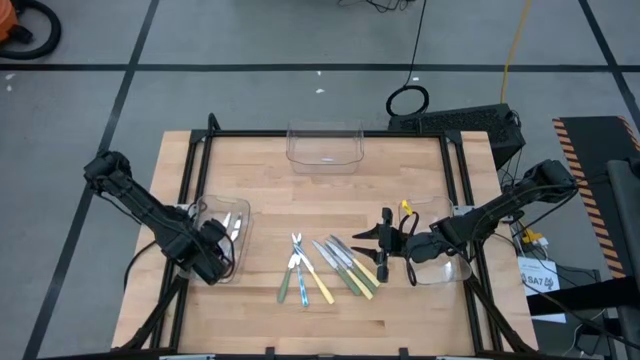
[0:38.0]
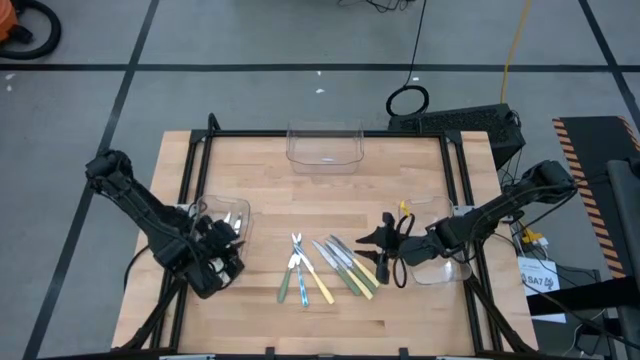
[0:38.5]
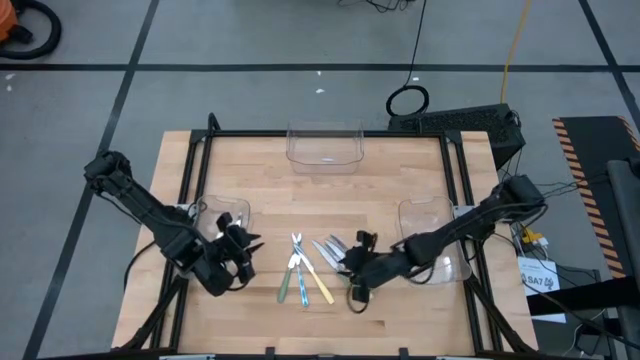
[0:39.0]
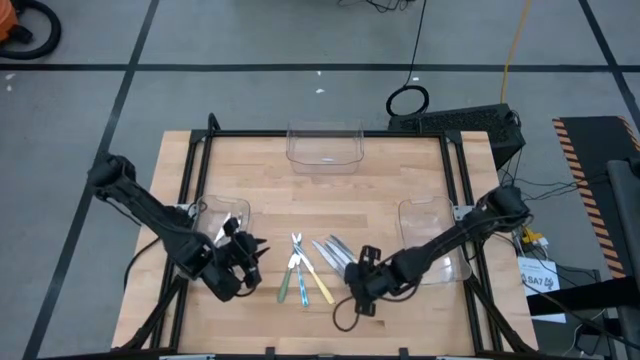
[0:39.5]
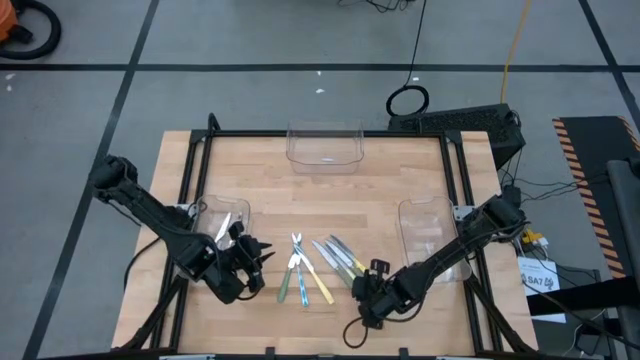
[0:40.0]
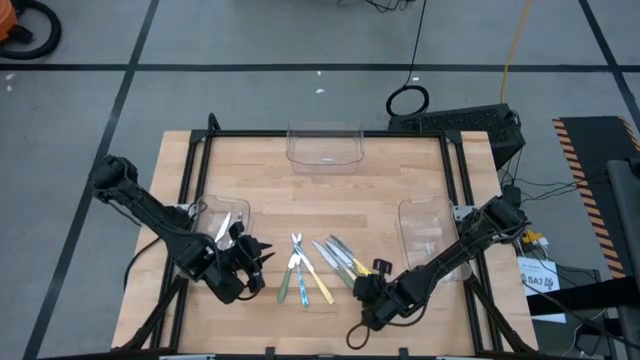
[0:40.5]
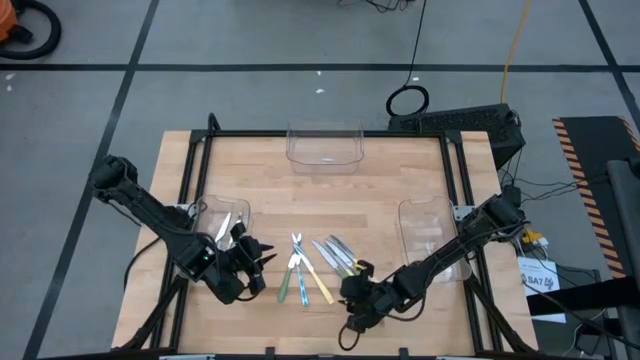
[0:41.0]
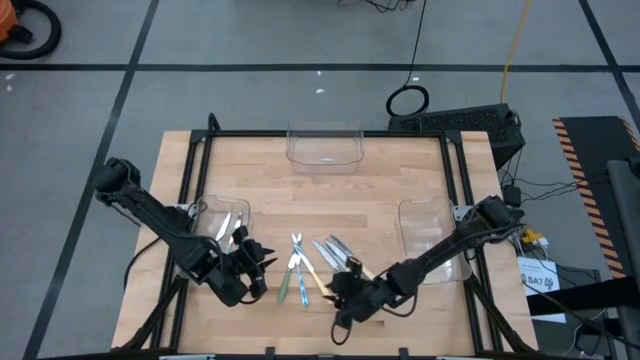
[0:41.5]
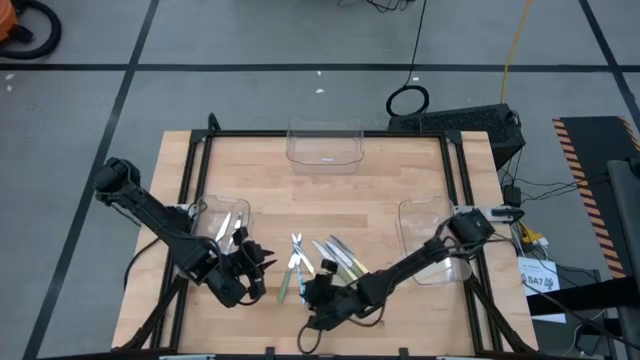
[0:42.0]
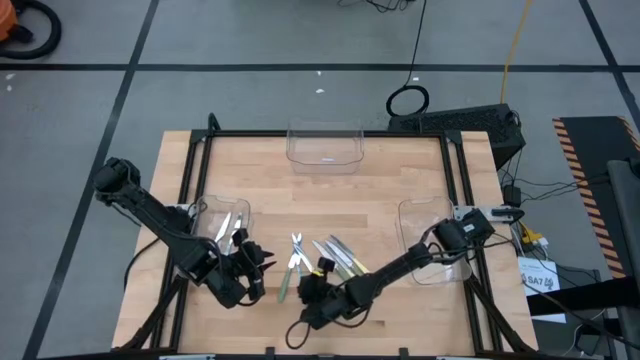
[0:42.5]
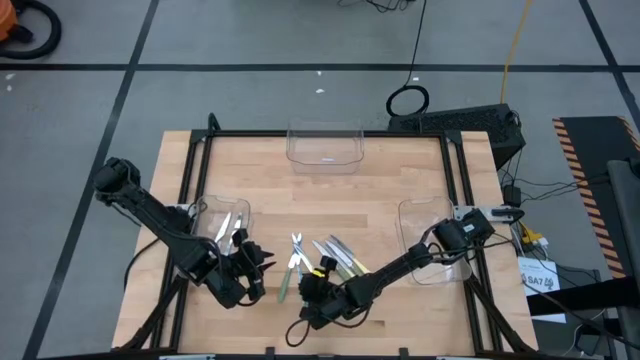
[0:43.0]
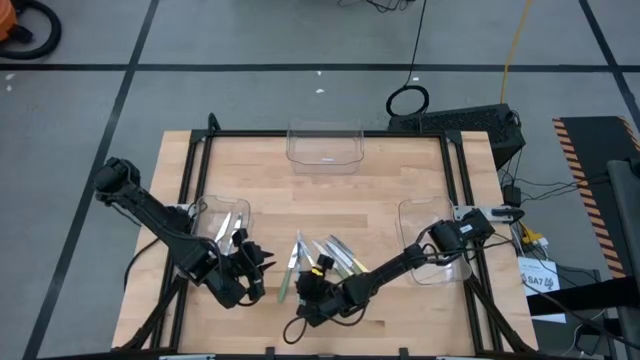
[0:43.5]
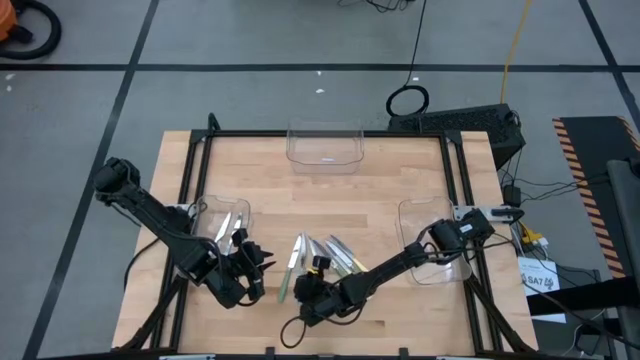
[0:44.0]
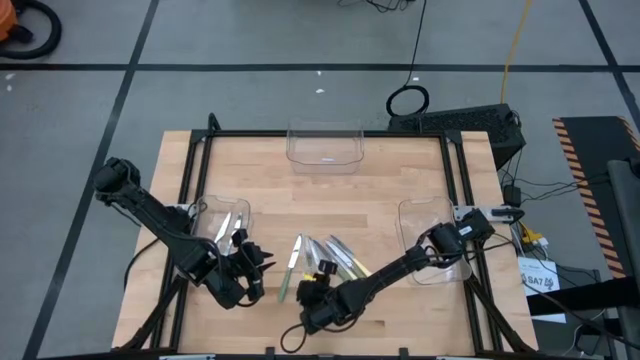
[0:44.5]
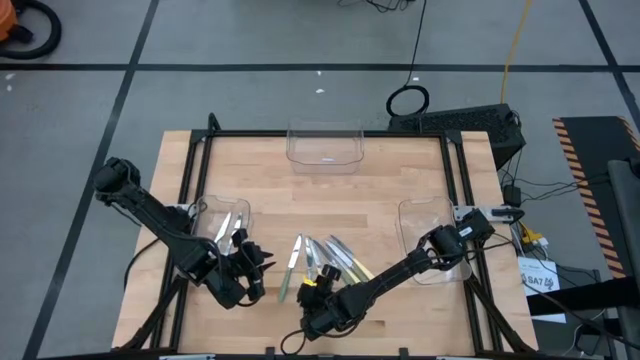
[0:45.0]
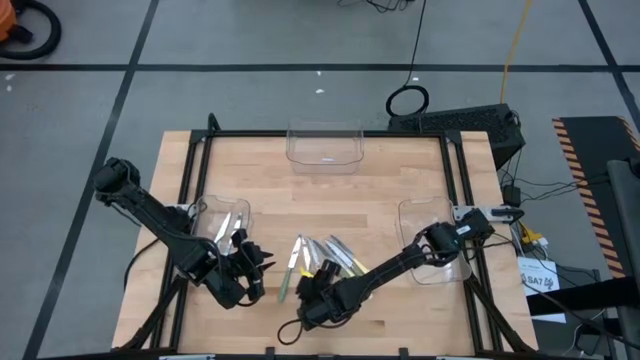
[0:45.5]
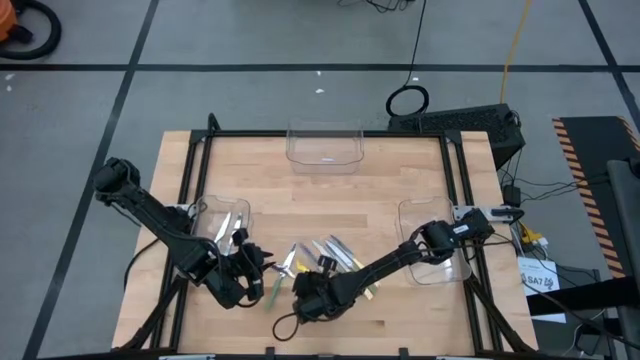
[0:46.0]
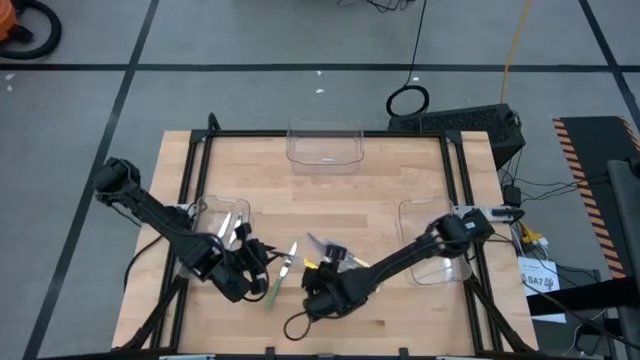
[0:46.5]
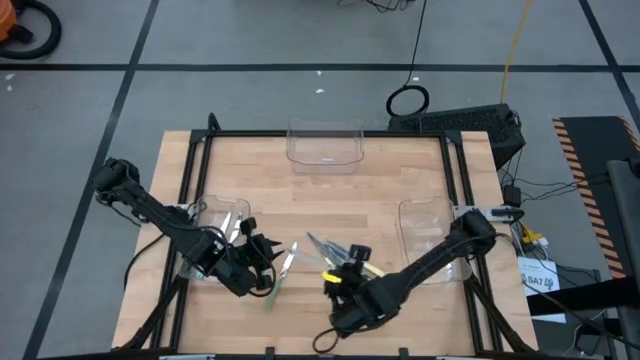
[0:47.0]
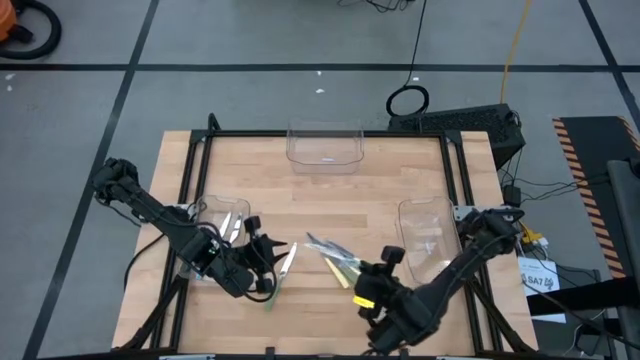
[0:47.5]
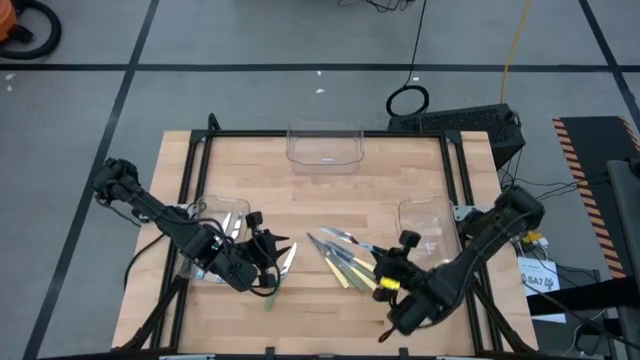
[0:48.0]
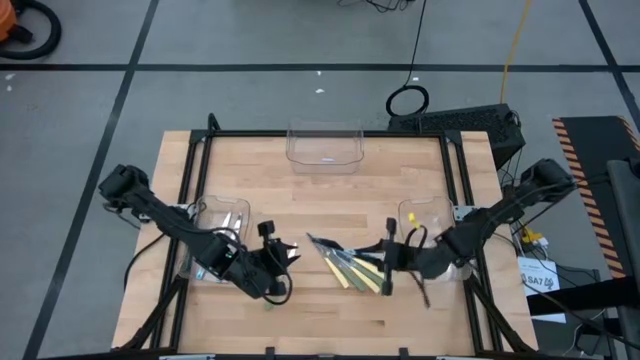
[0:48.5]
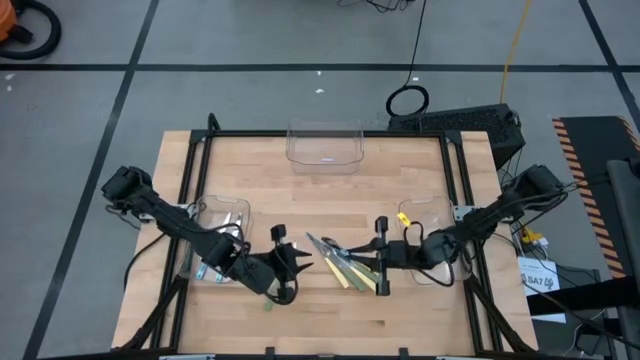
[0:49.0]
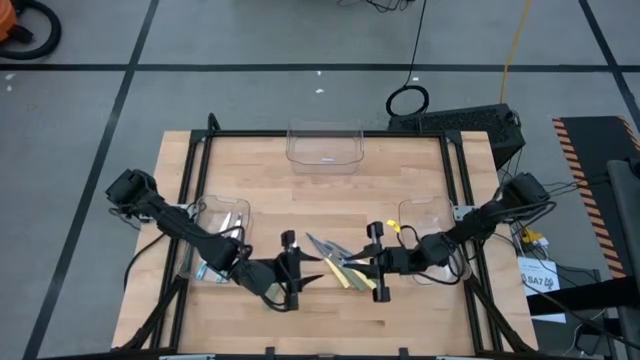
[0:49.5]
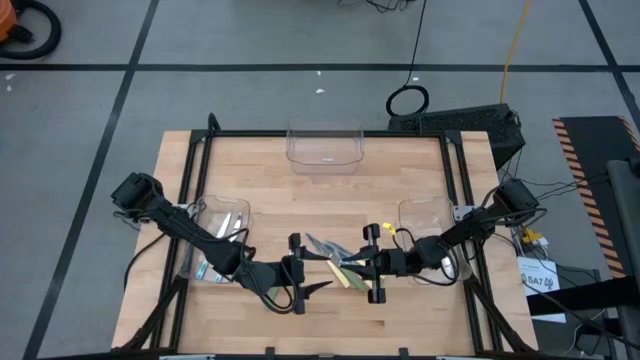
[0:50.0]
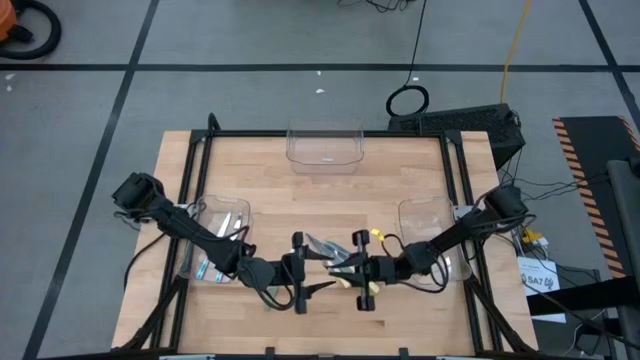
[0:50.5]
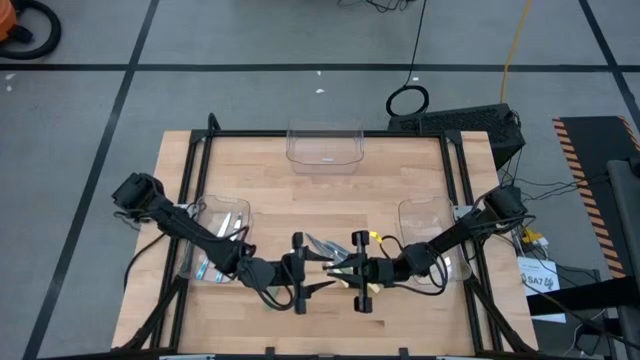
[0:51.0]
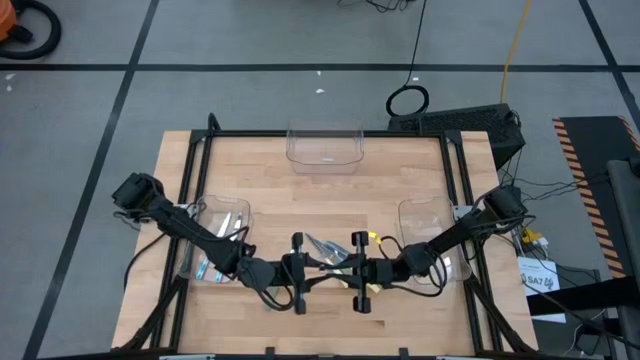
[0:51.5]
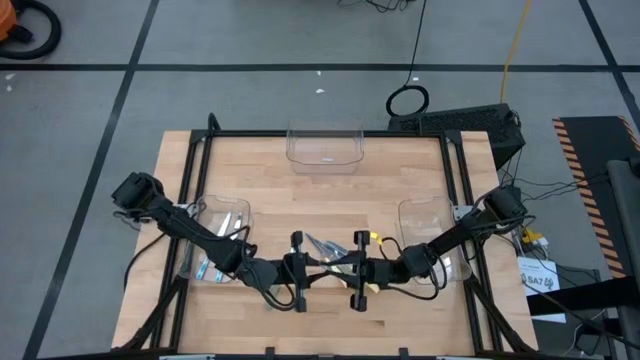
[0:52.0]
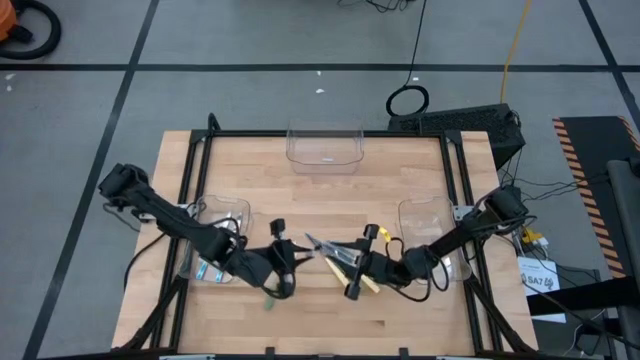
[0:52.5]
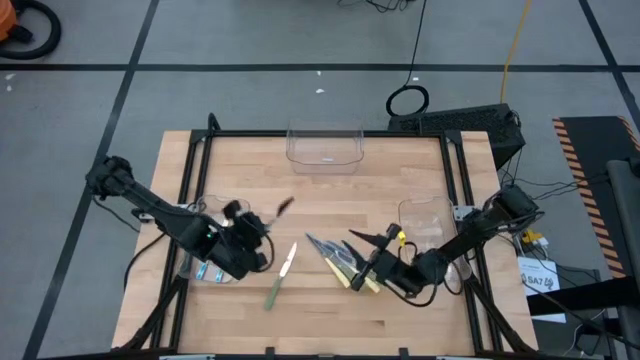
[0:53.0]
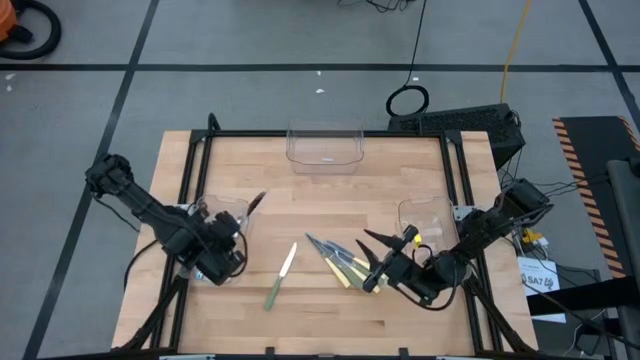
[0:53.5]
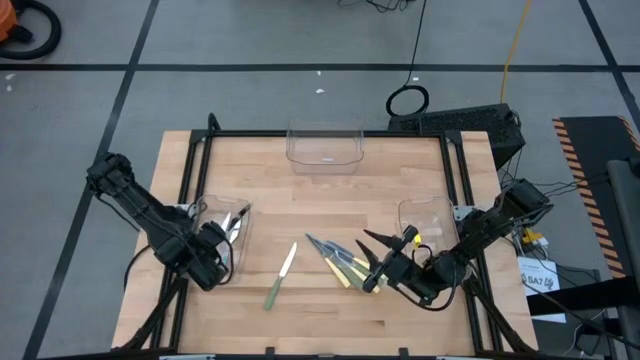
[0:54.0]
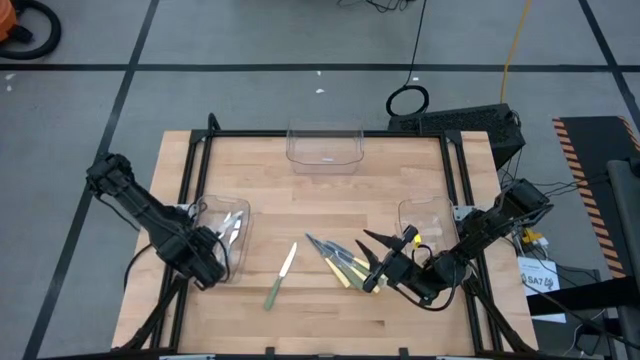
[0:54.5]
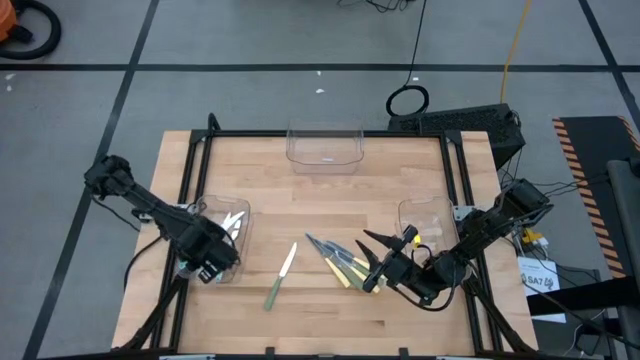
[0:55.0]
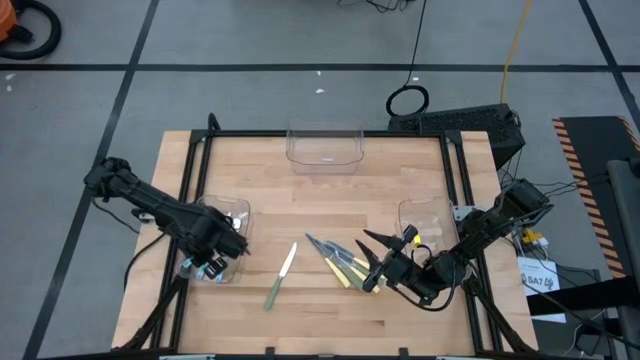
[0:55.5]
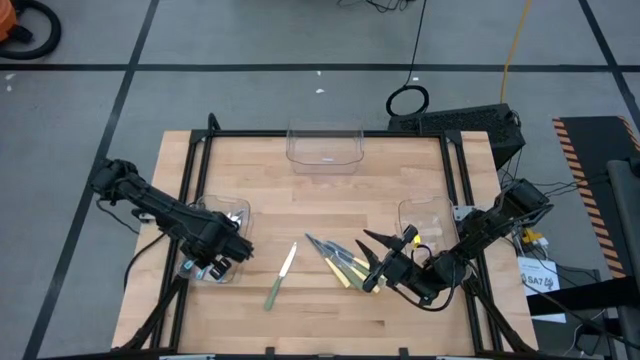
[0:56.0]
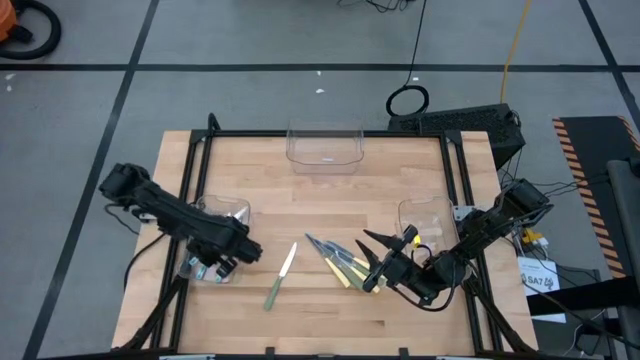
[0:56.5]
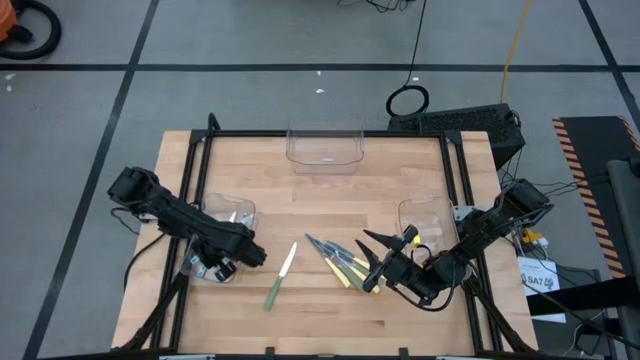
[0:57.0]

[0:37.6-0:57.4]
Task: Sort silverware by color (type)
Put the white and blue patterned knife into the bottom left transparent bin

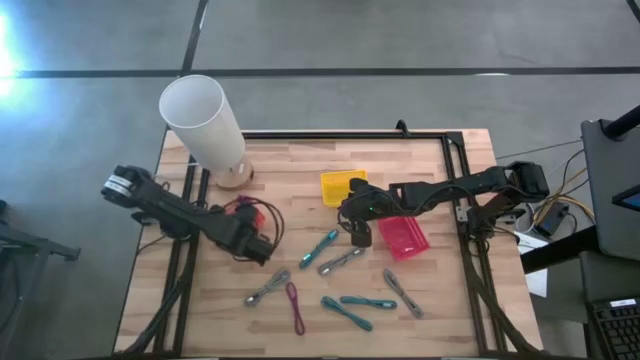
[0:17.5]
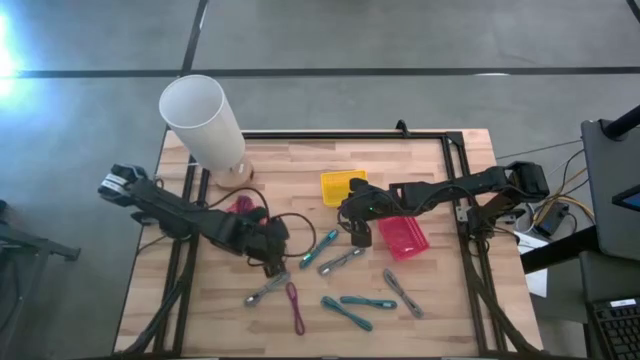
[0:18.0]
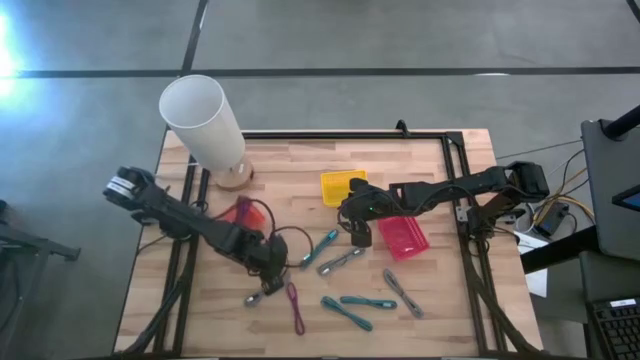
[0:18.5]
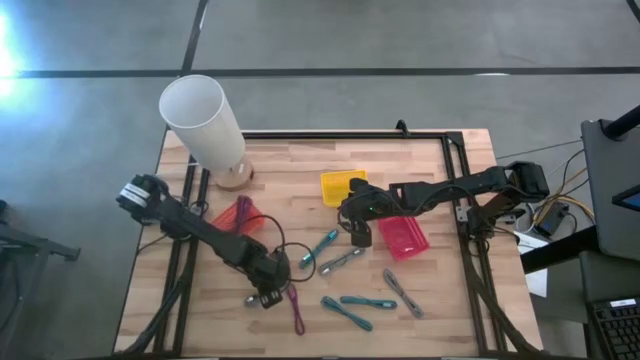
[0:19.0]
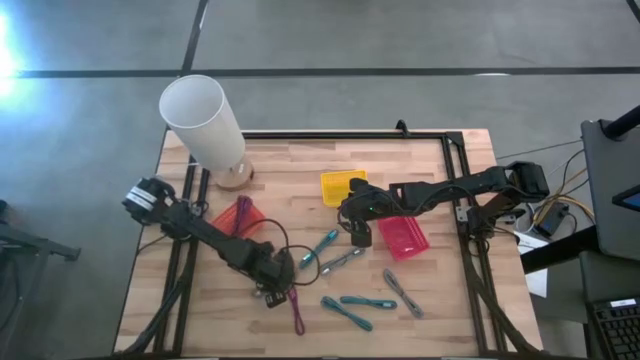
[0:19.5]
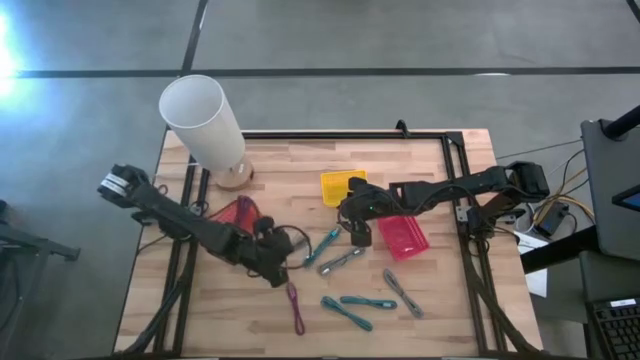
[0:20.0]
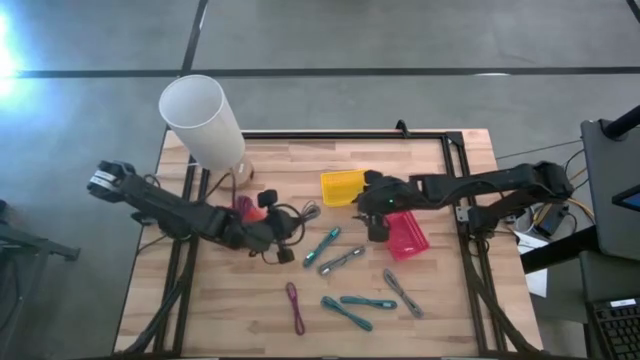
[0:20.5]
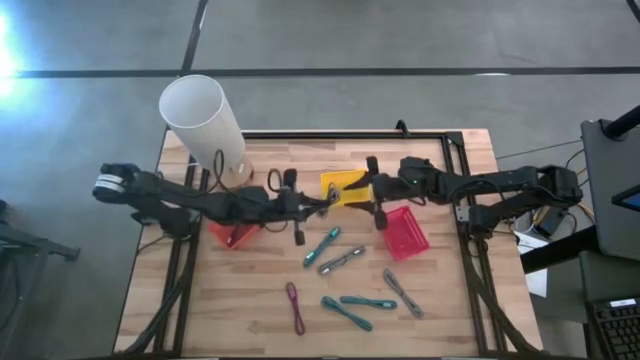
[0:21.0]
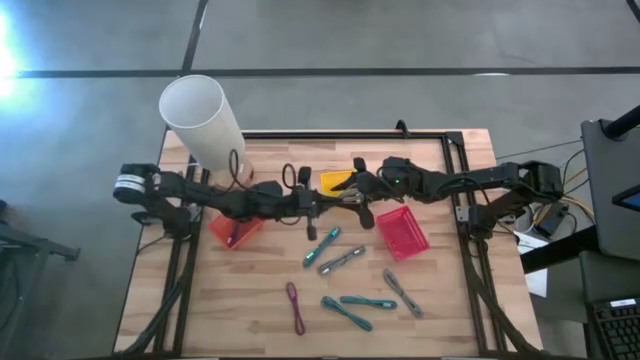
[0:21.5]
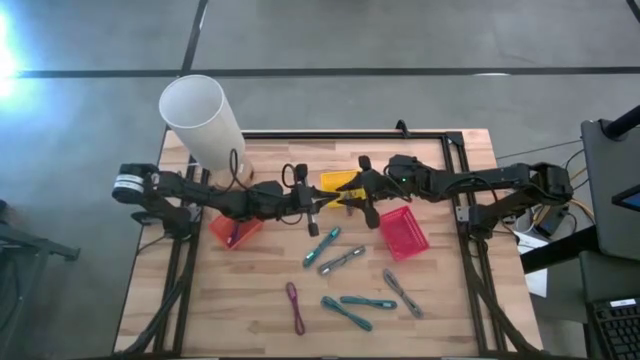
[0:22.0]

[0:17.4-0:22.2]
Task: Pick & Place USB Port
Put the left white patterned charger cable into the yellow bin
